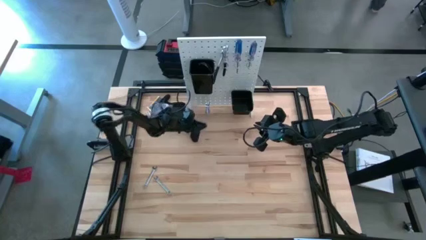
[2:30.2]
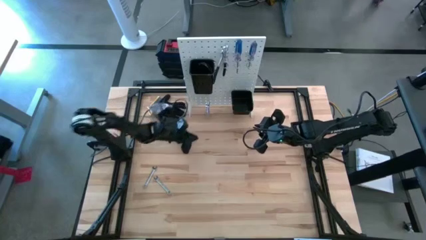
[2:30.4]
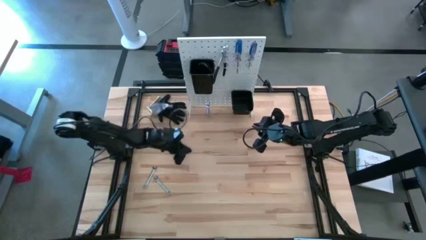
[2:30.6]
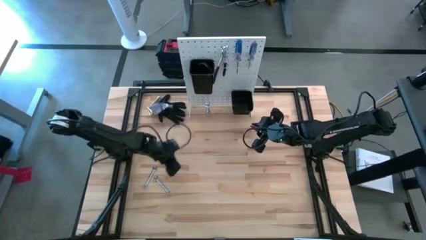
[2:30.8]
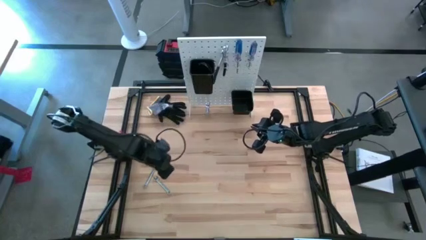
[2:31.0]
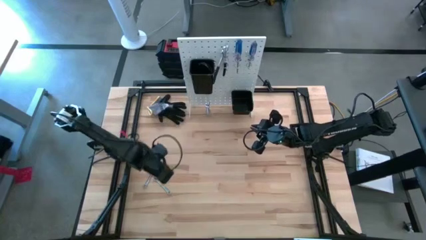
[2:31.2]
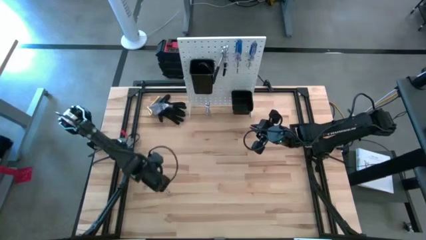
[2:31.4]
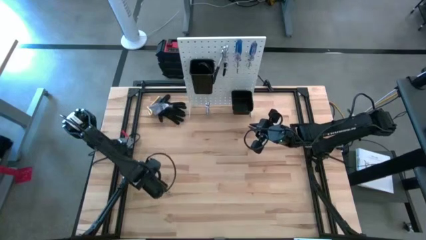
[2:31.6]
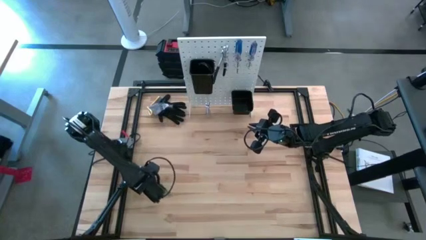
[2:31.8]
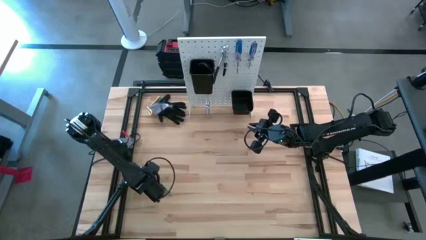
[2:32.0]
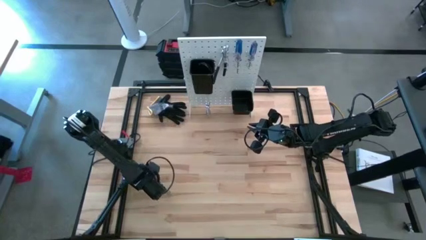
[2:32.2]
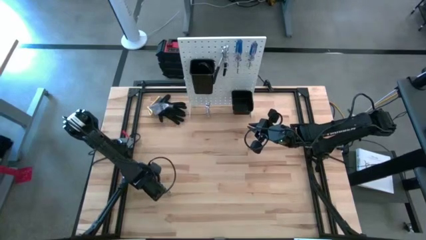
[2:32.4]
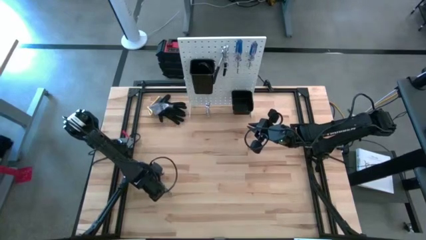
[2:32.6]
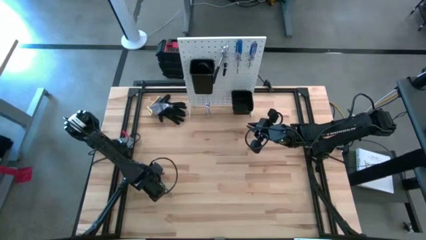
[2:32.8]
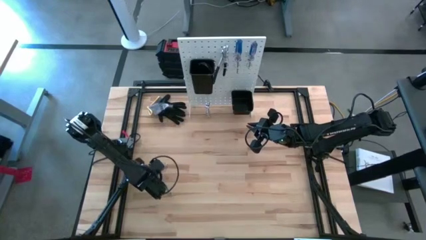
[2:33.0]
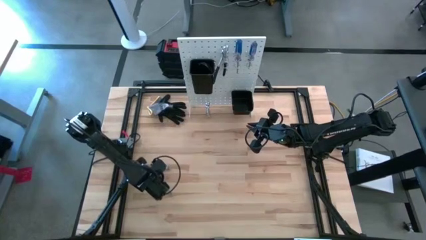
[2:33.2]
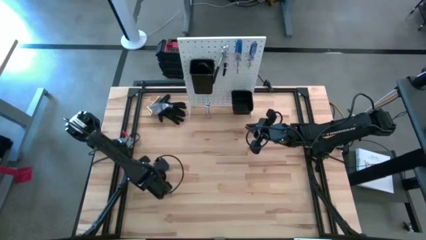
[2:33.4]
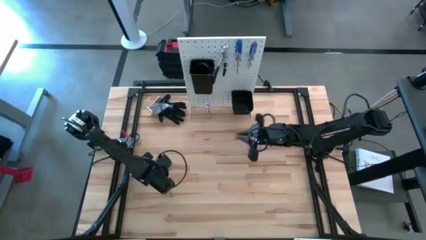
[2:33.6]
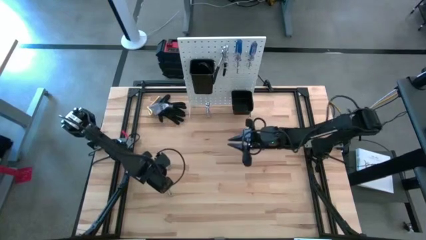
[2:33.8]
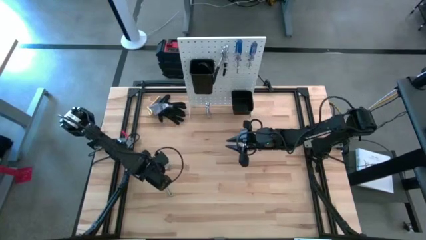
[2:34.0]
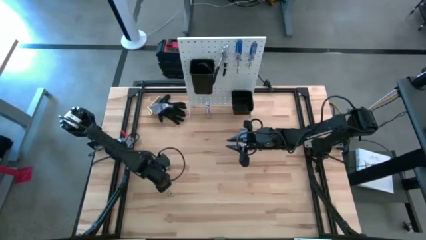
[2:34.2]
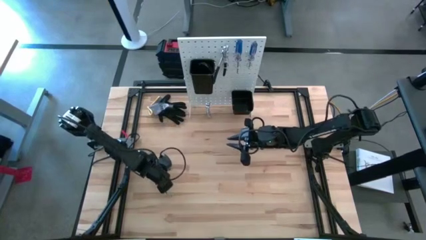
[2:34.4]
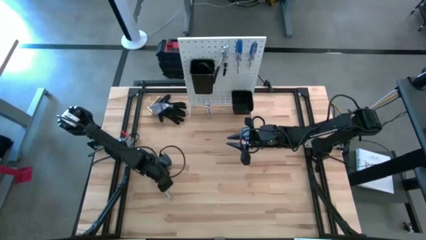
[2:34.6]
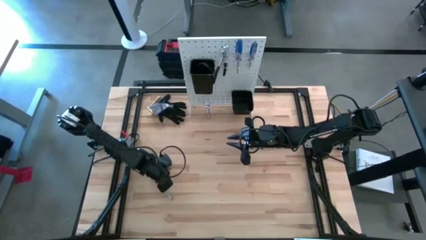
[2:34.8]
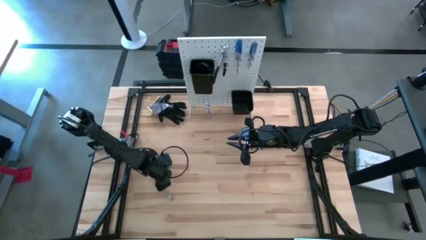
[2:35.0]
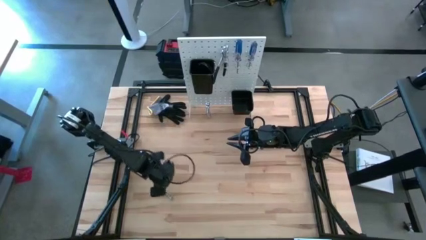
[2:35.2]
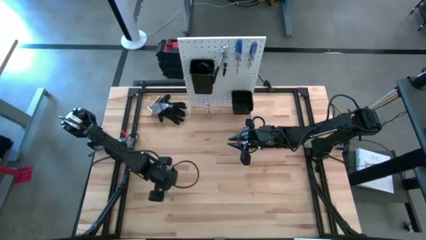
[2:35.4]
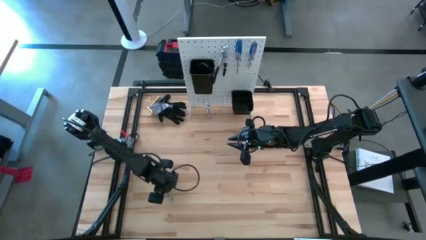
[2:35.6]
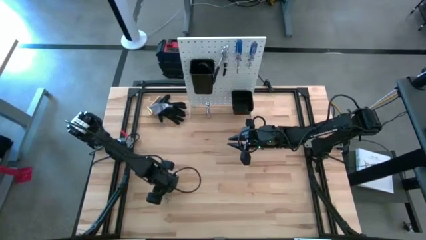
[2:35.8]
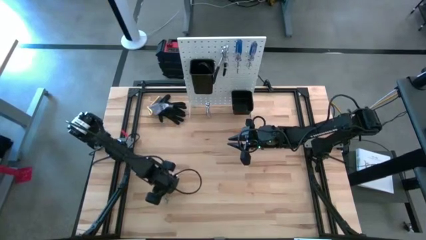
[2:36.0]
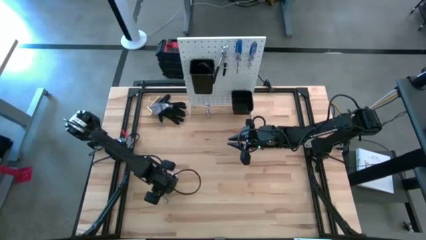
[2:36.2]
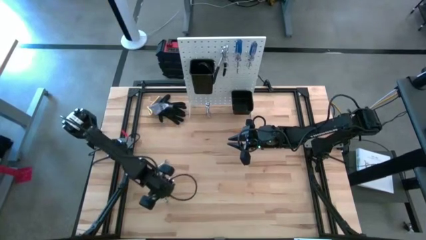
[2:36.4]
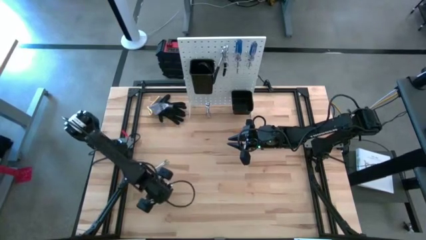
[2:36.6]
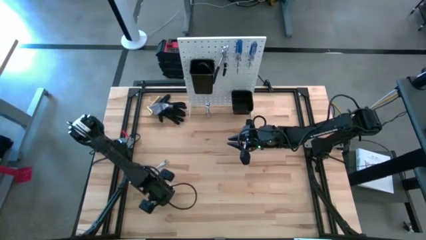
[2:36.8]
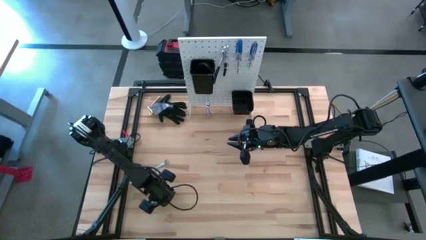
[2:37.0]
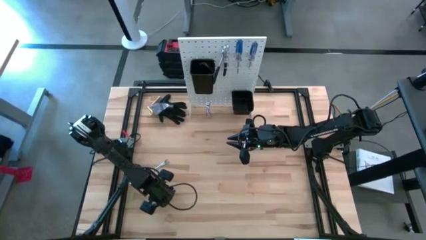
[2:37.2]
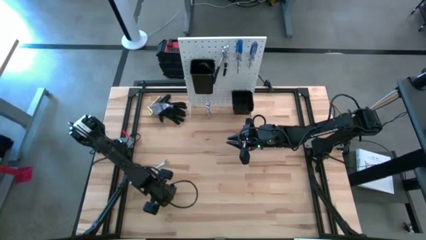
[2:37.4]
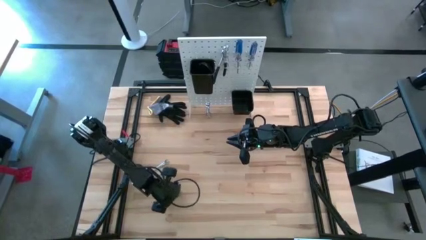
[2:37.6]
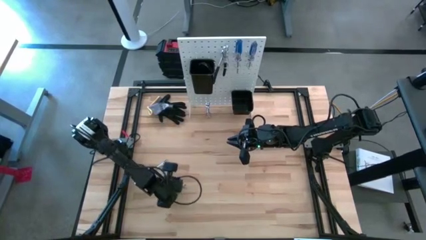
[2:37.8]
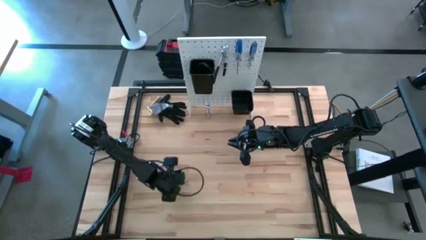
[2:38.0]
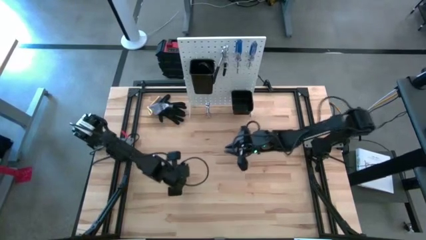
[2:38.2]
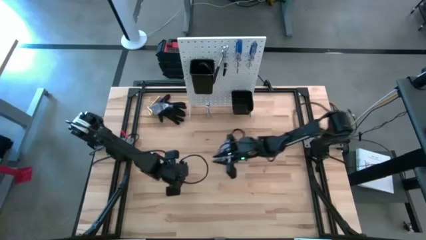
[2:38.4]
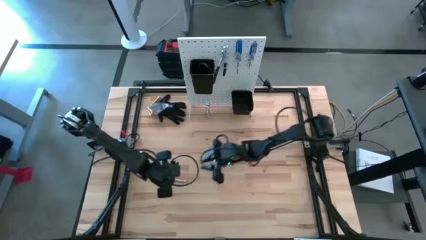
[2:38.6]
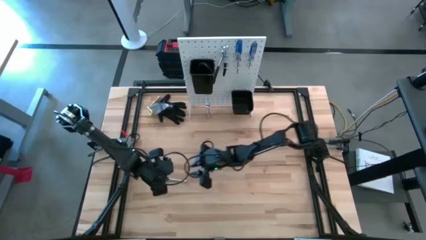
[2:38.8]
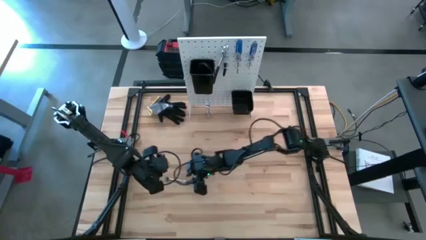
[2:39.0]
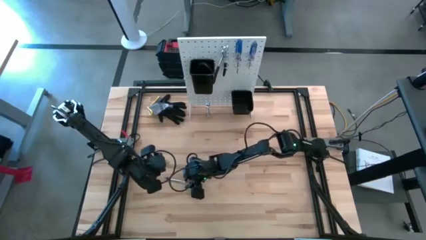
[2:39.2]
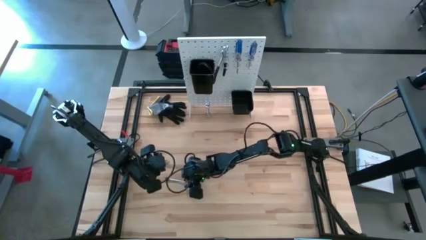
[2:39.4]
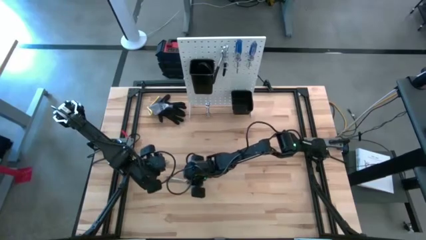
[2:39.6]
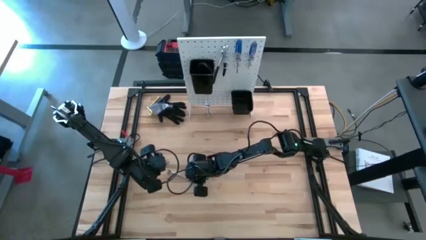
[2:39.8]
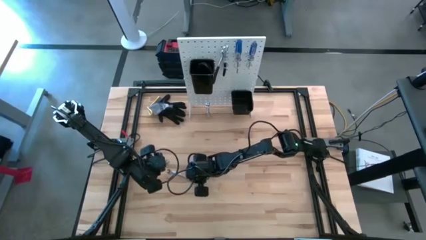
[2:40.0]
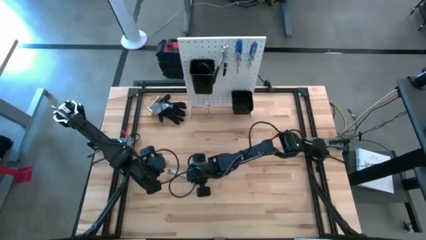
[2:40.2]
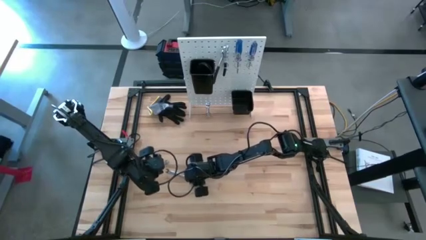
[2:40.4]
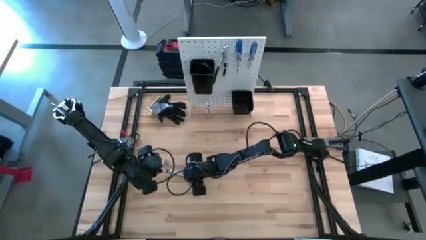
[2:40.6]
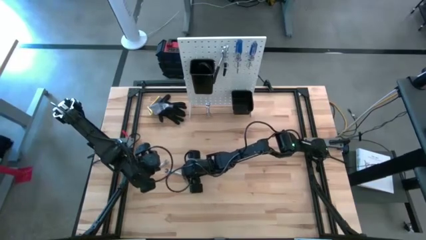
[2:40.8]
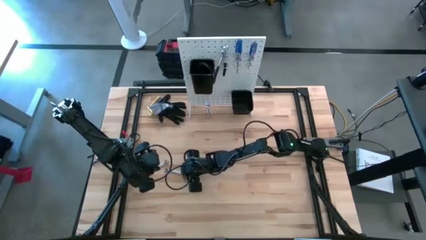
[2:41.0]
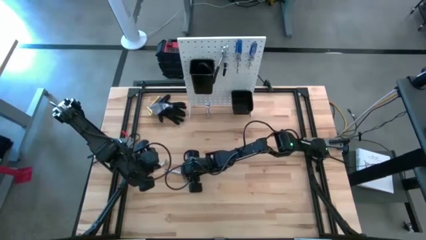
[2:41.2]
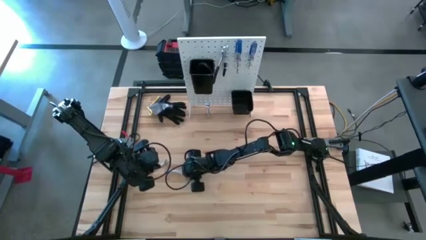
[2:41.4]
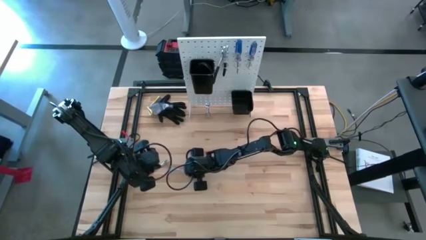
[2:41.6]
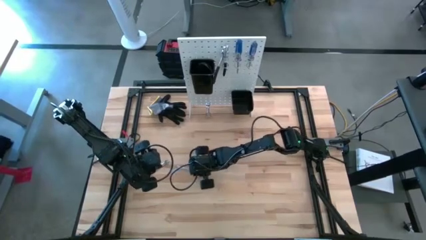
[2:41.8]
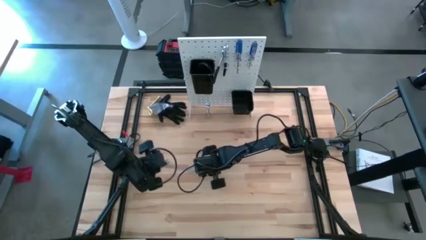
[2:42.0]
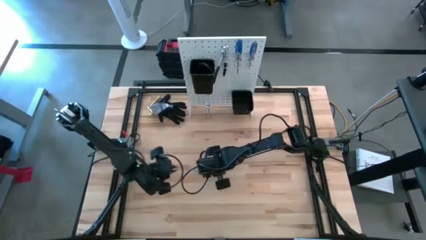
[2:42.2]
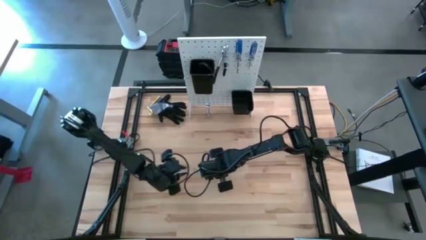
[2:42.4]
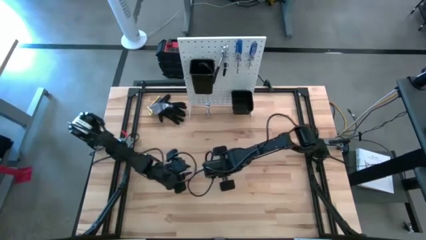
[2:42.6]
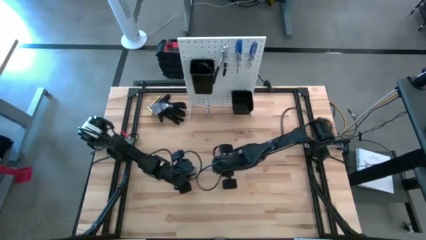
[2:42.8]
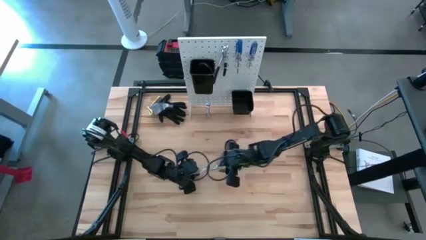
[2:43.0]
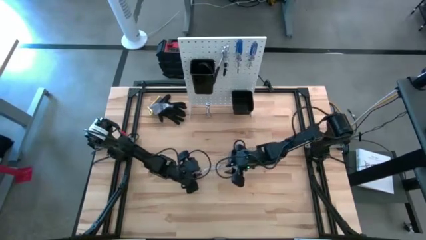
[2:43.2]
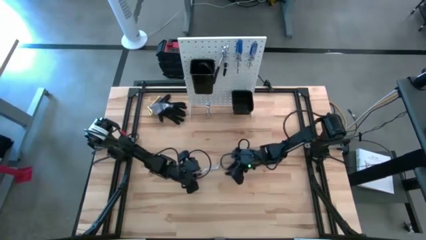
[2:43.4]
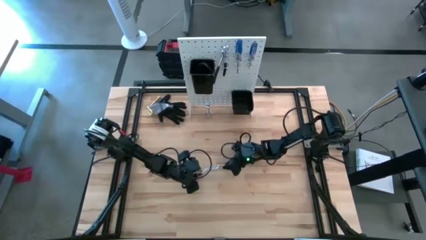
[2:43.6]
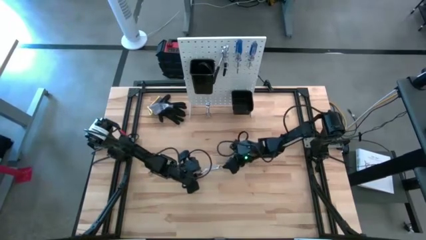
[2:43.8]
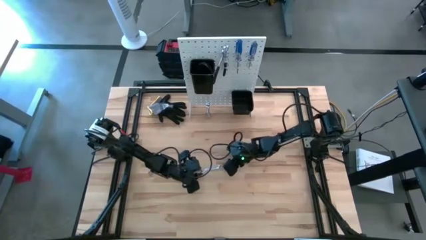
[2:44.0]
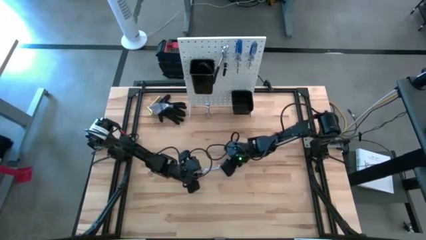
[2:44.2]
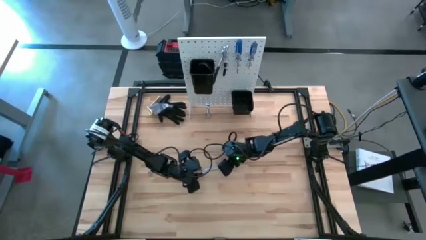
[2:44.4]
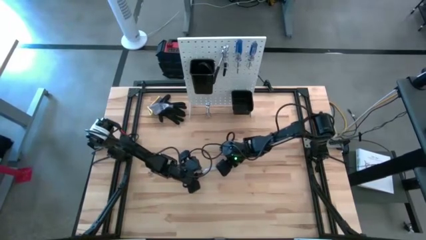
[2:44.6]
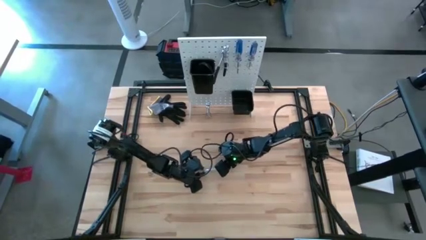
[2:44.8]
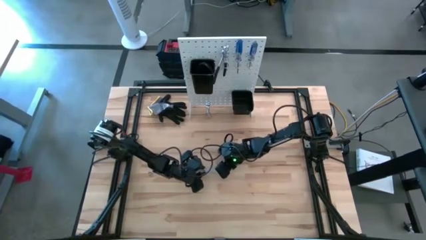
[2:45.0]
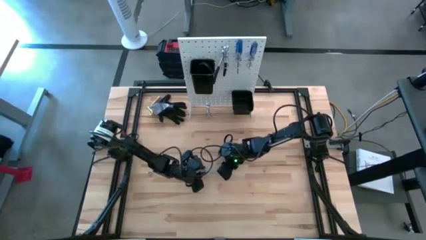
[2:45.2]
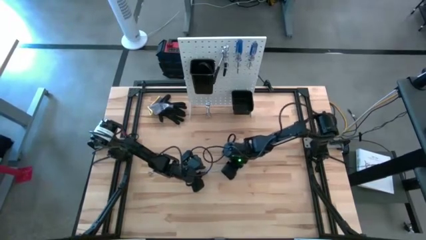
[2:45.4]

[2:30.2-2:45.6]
Task: Hang tools onto peg board
Hang the wrench on the peg board
